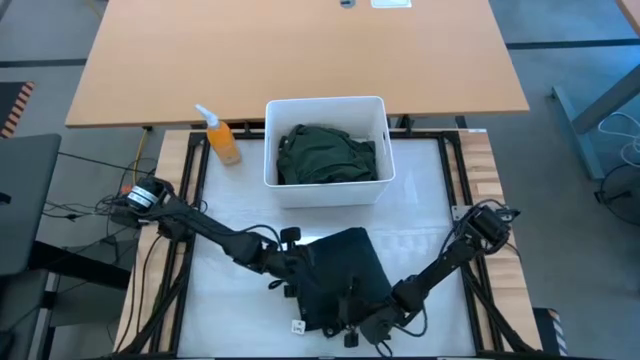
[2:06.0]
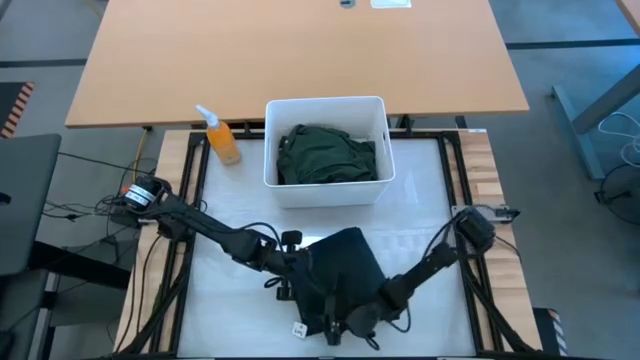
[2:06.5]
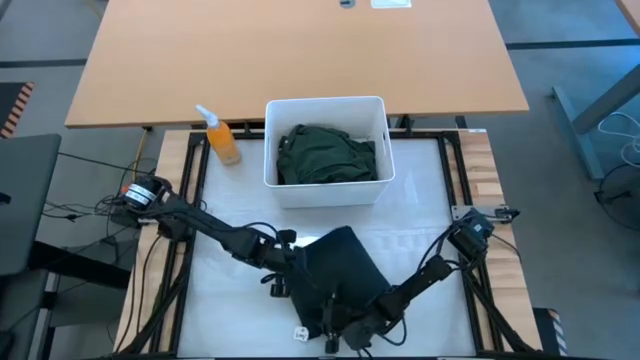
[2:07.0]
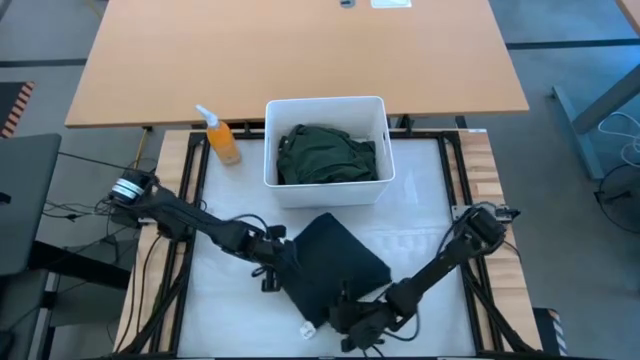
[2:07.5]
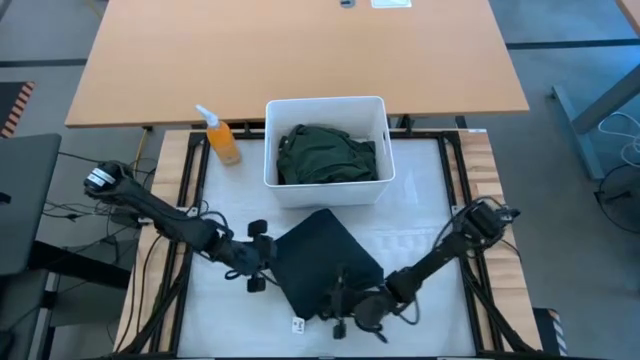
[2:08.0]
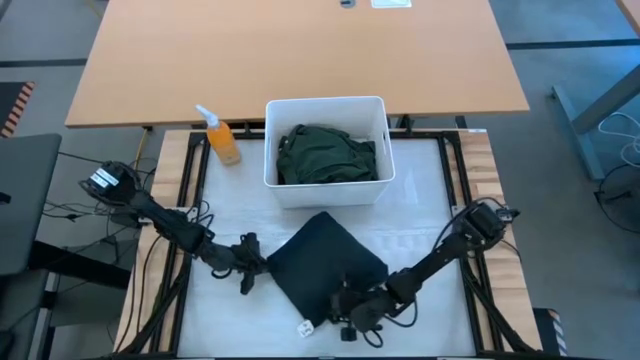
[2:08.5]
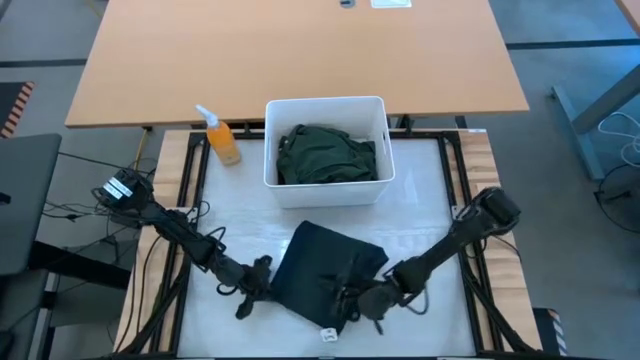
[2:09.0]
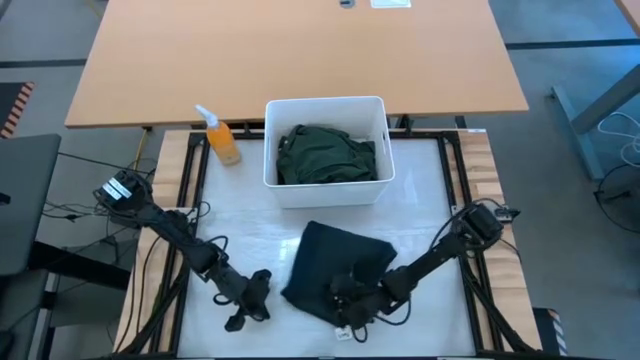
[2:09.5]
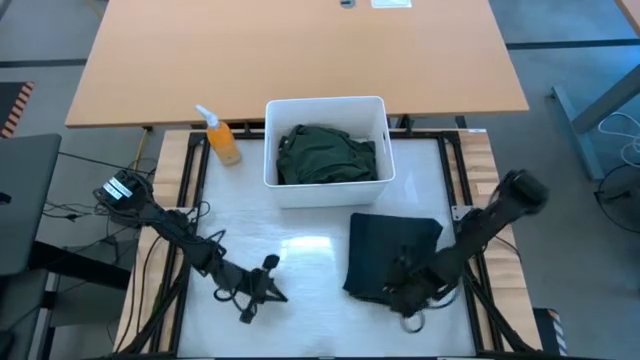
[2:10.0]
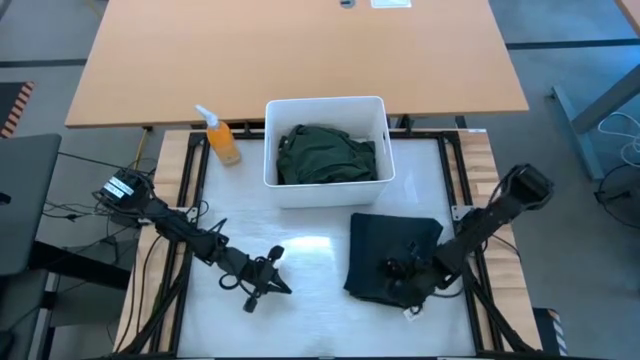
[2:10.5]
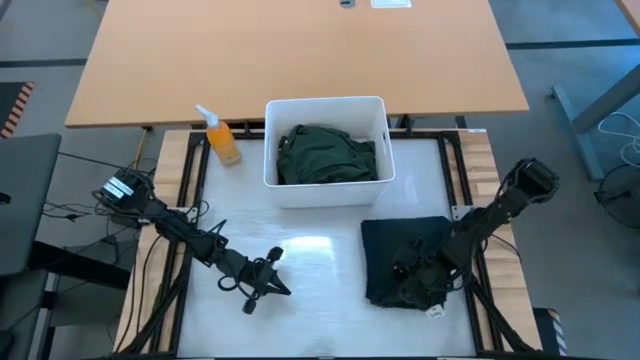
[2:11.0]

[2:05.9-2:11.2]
Task: Fold laundry
Move the folded dark blue jeans to the top right of the table

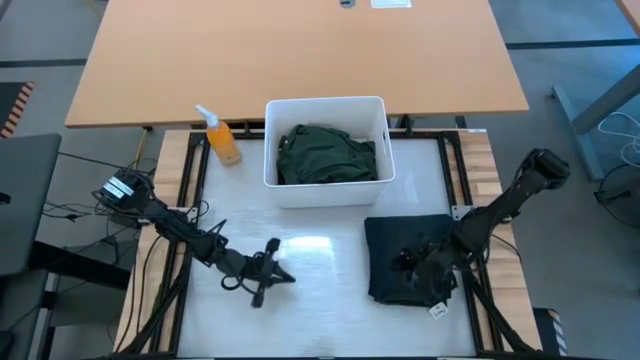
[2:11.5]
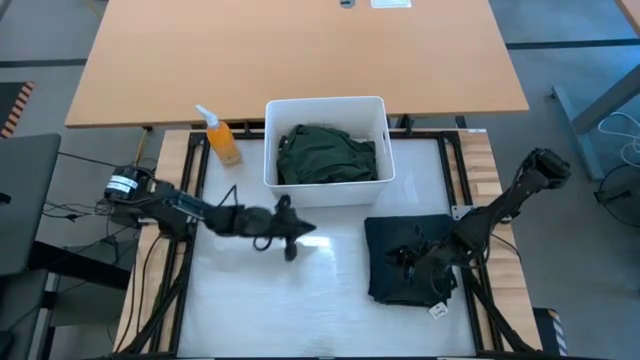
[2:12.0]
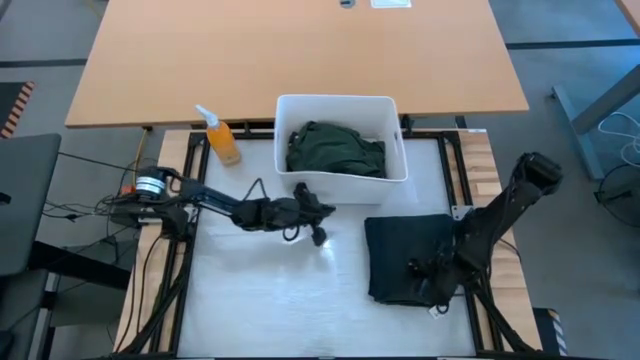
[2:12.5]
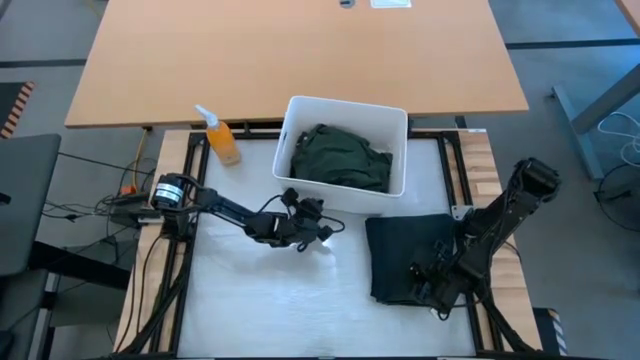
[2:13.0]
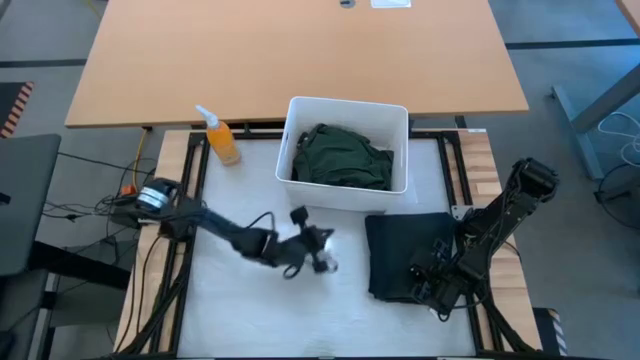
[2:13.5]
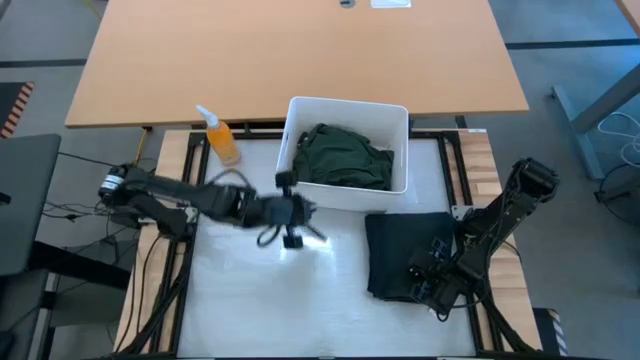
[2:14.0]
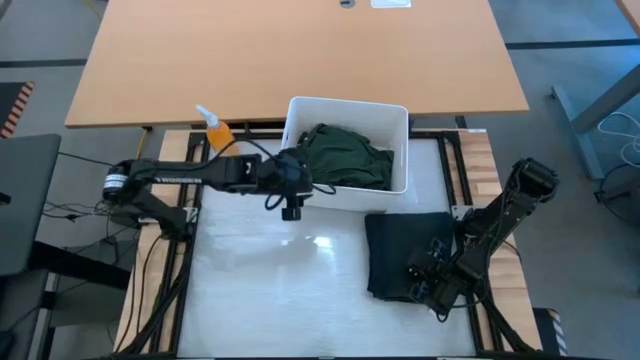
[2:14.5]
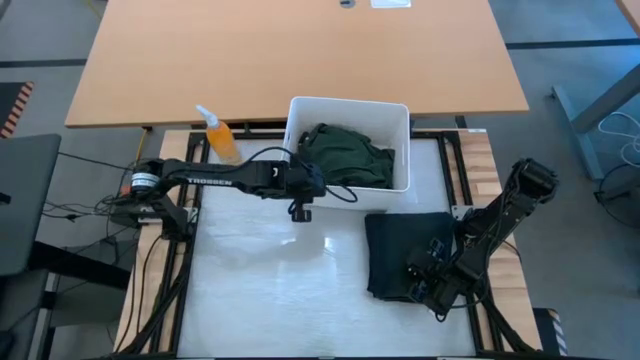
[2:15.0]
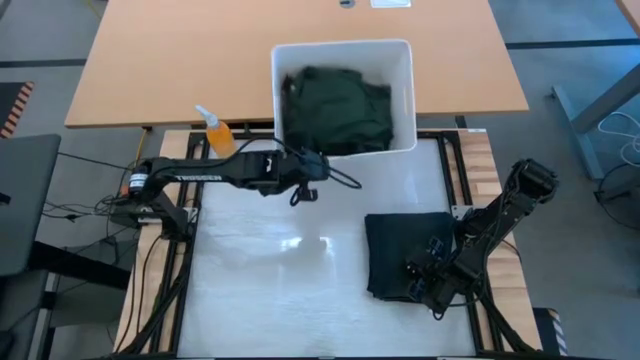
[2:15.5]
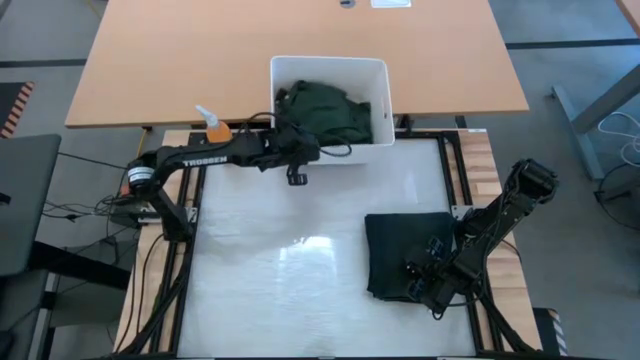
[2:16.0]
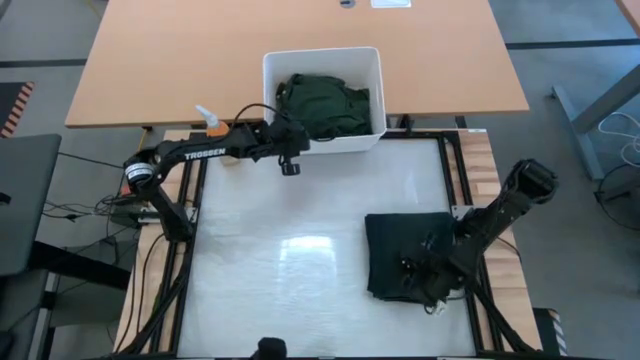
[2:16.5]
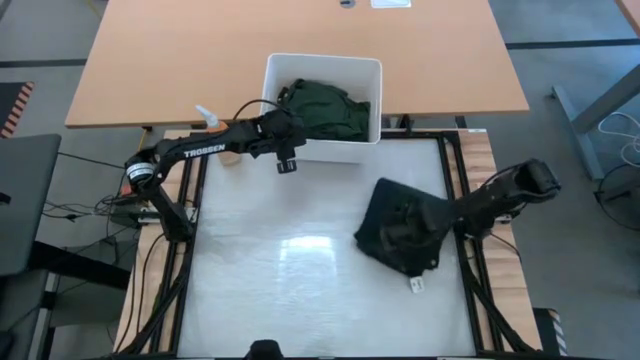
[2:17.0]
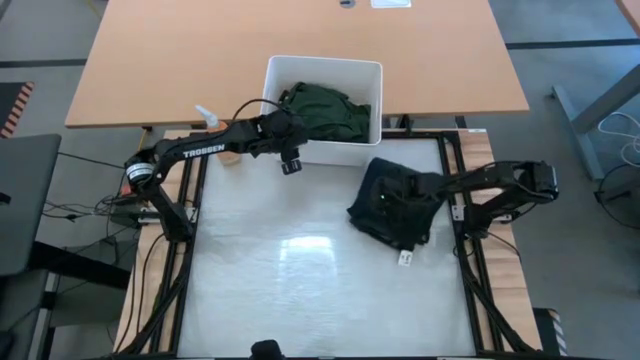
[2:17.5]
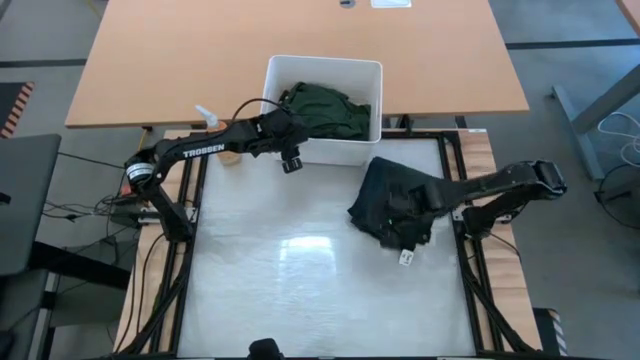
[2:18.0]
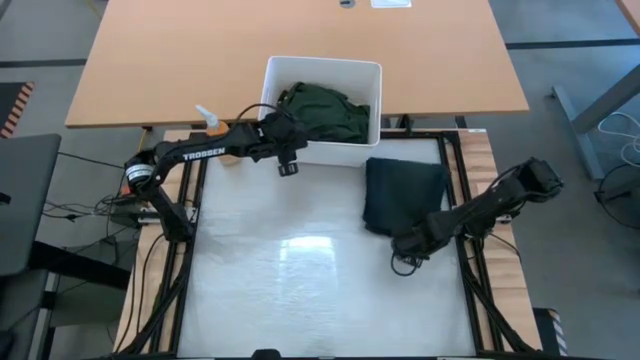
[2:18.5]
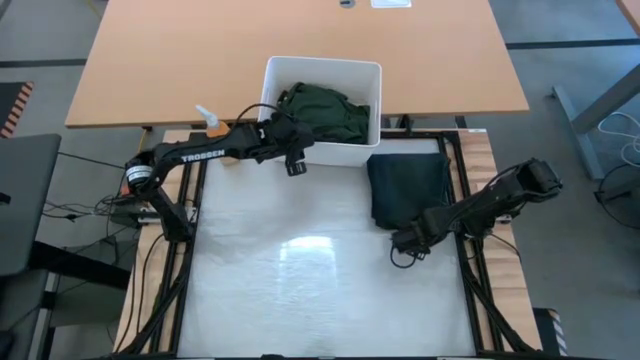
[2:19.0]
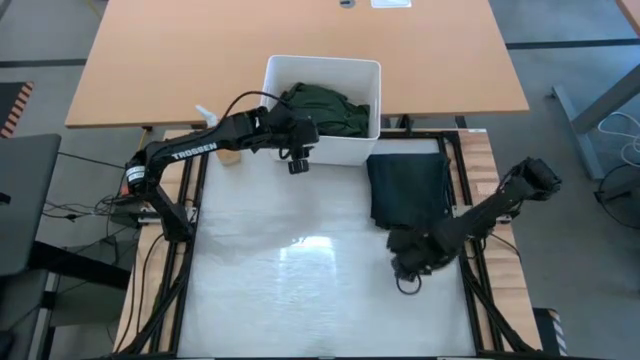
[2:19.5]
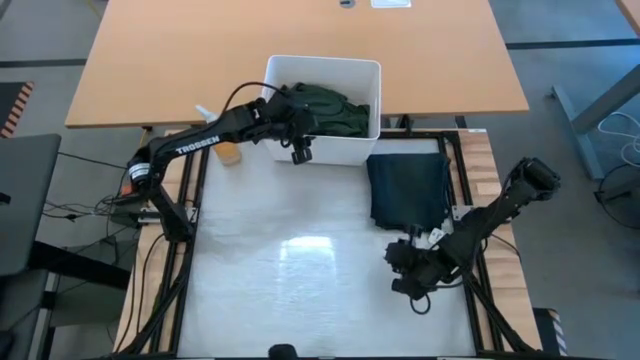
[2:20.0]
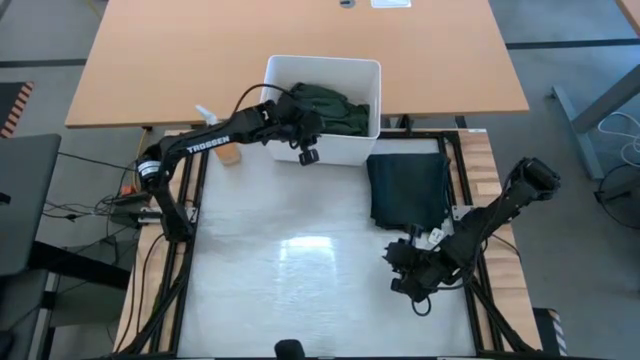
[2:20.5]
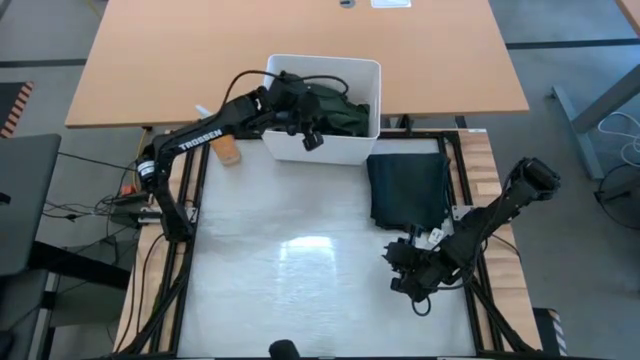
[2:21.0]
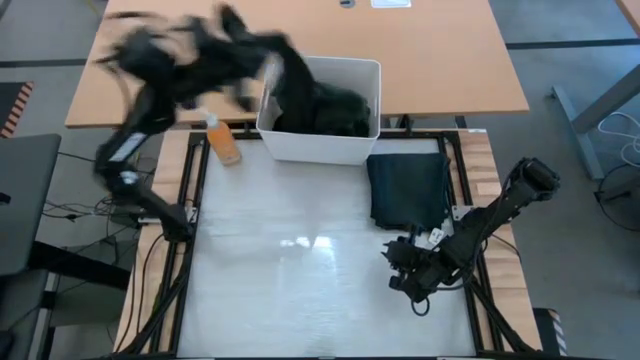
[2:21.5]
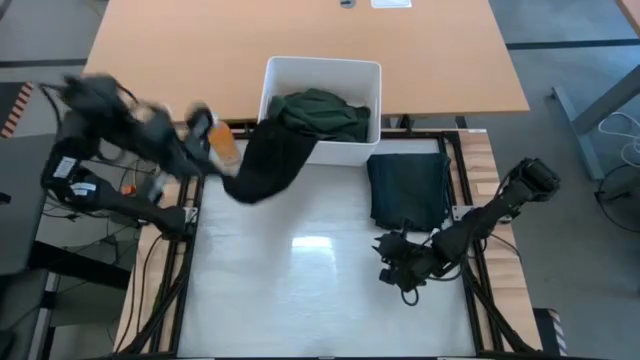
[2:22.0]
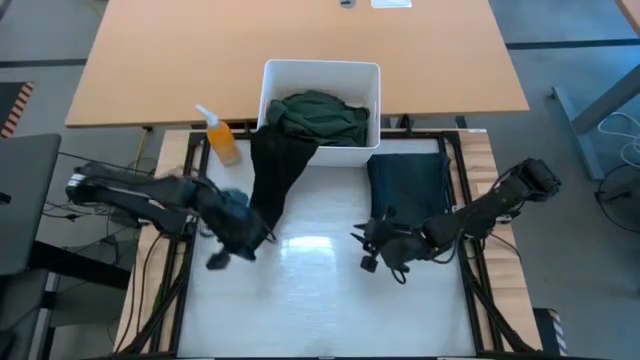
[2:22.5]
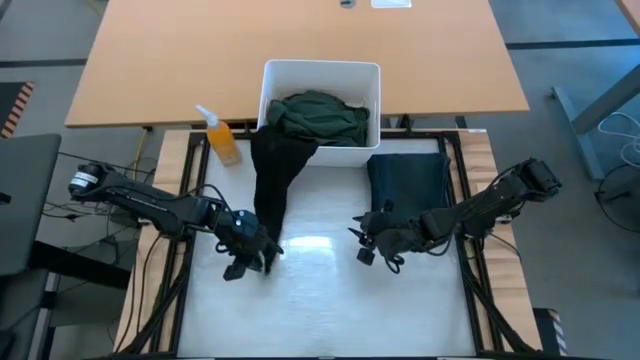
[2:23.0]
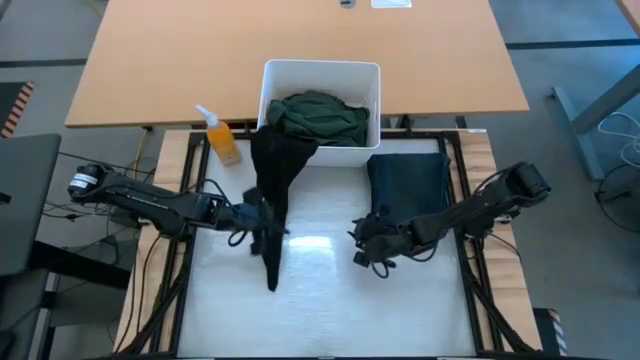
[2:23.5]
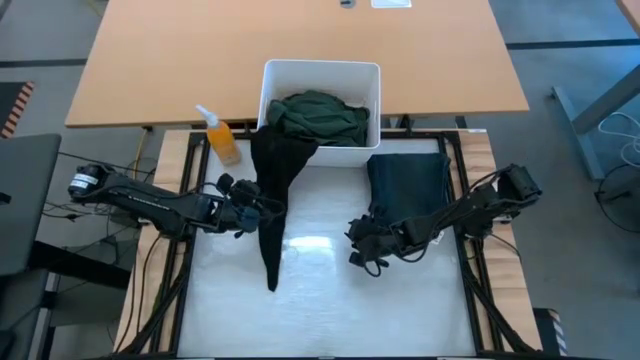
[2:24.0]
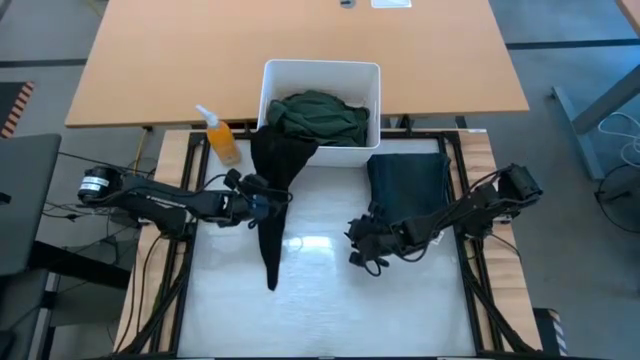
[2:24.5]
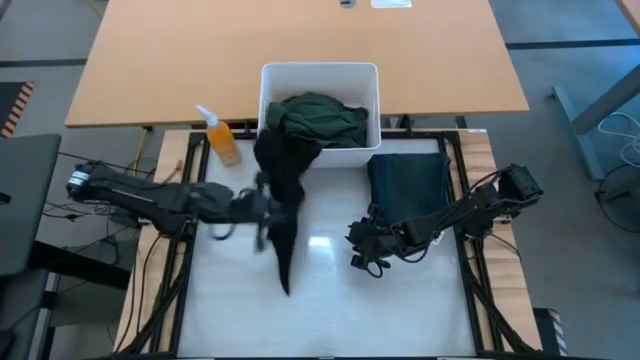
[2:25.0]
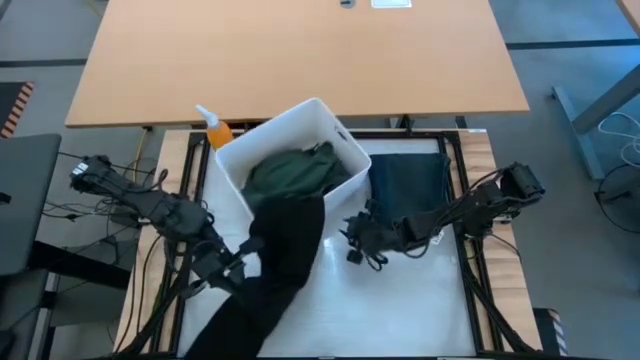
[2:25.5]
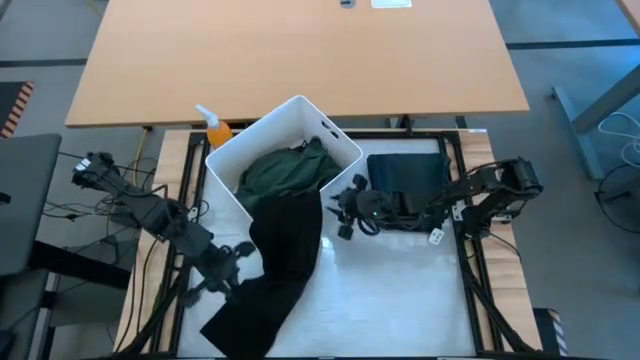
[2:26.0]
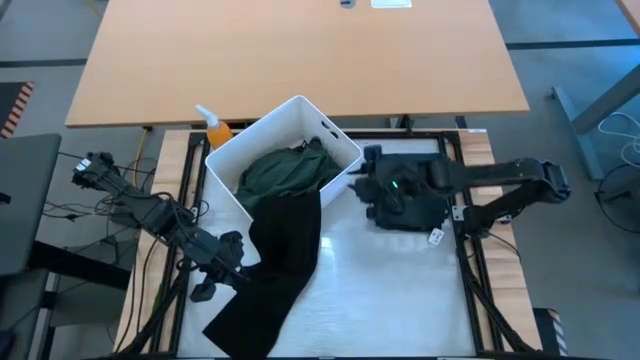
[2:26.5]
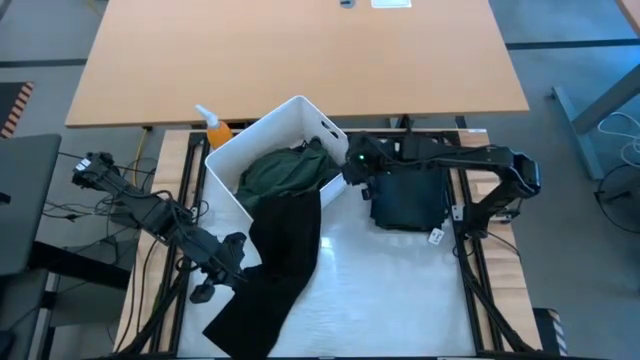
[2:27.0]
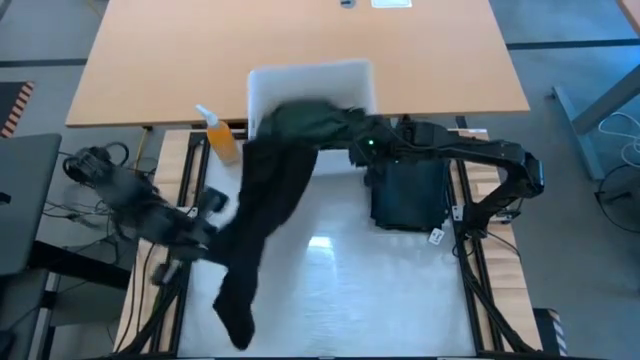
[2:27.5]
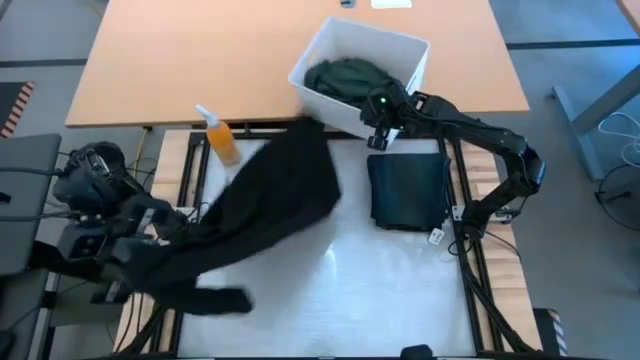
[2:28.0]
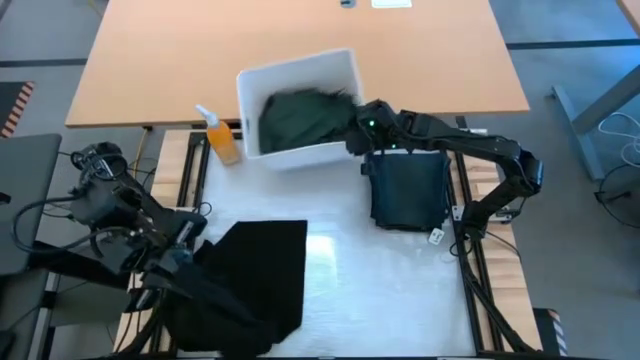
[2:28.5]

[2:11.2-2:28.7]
Remove the black t-shirt from the white bin
